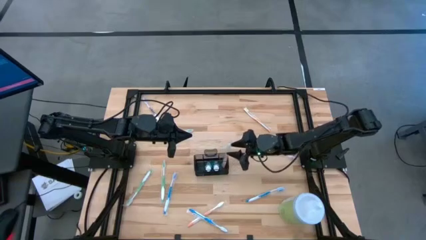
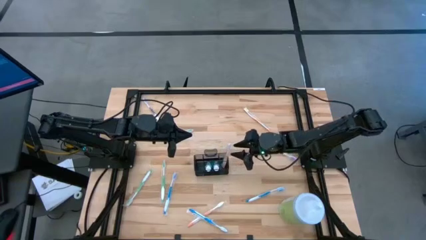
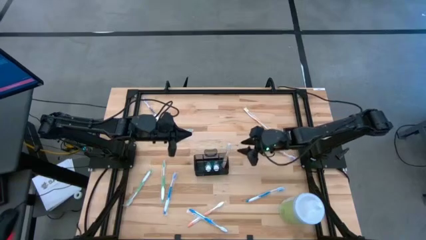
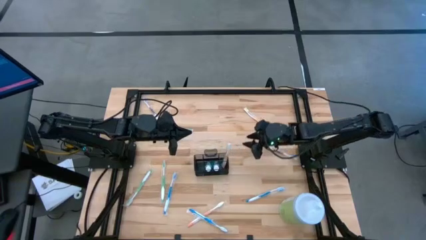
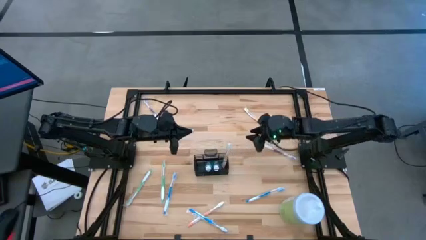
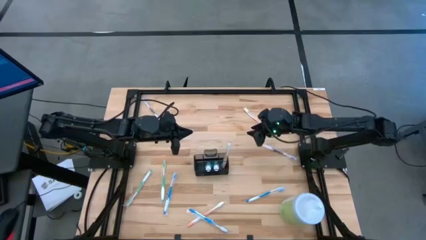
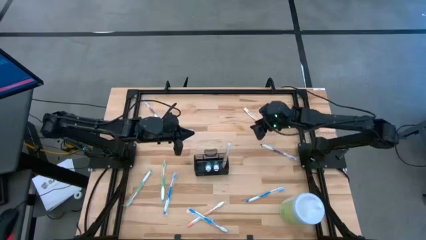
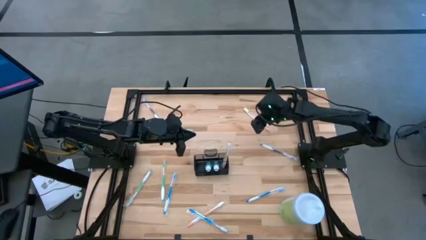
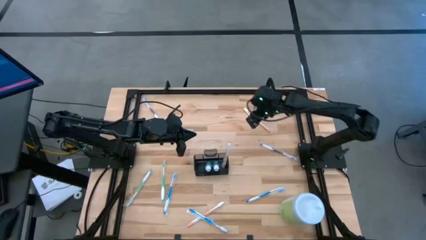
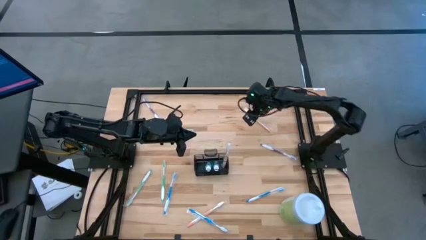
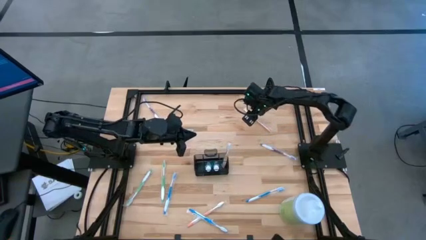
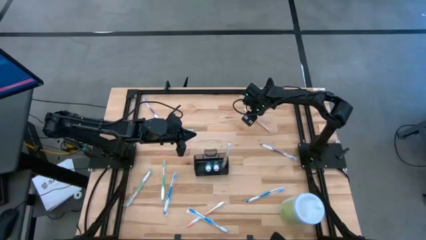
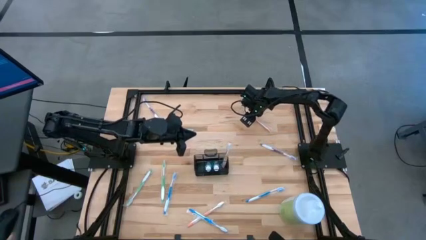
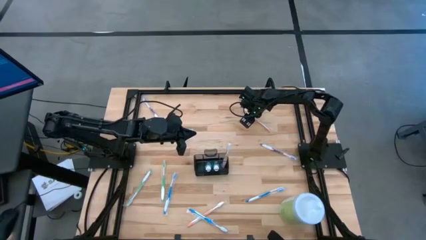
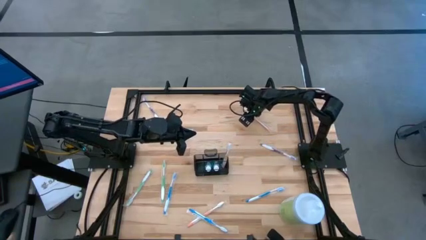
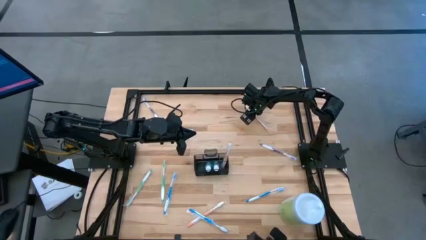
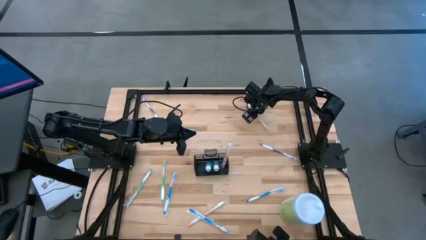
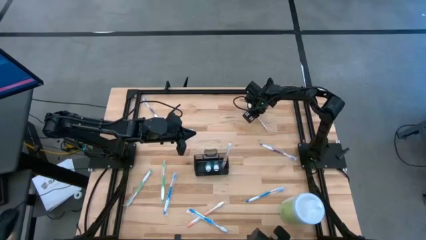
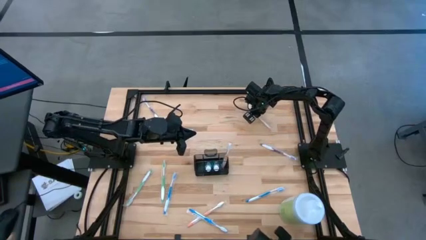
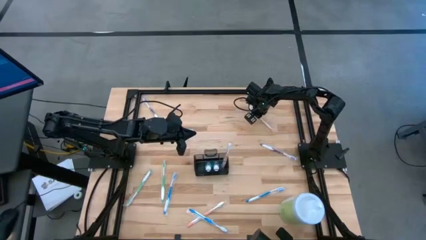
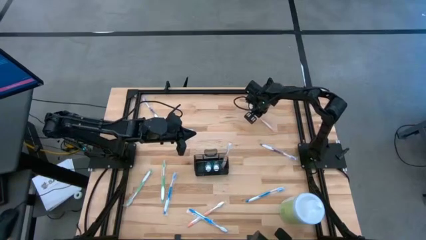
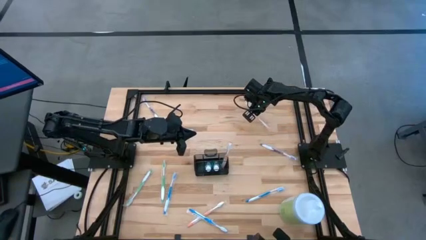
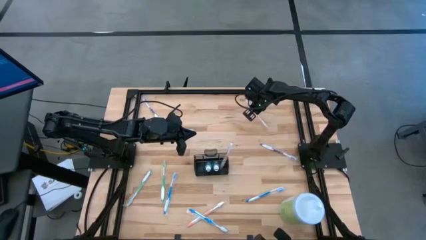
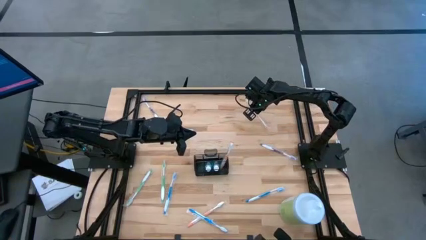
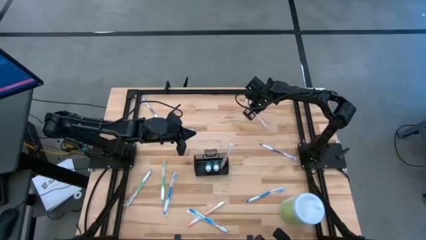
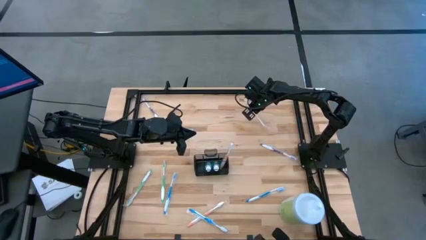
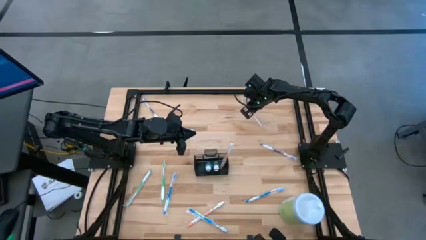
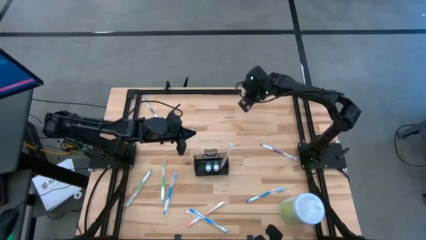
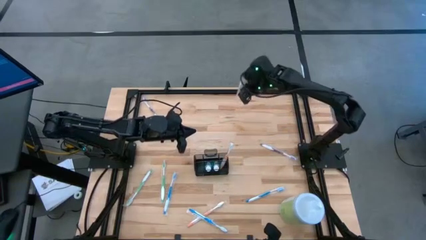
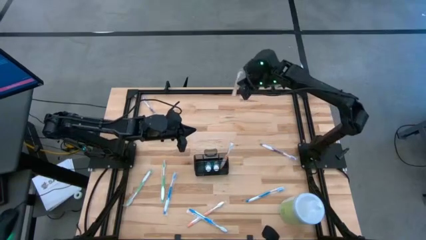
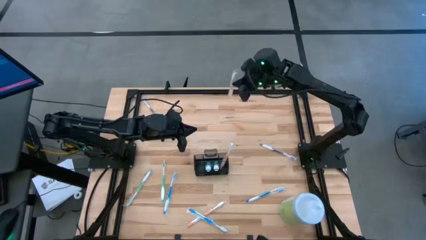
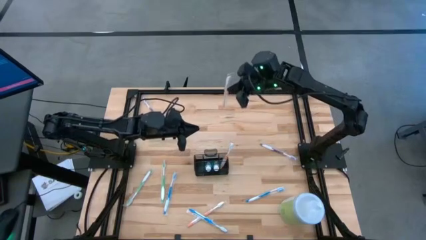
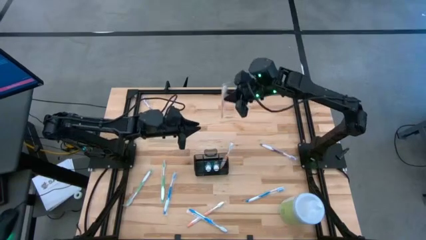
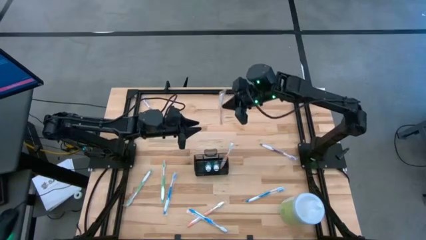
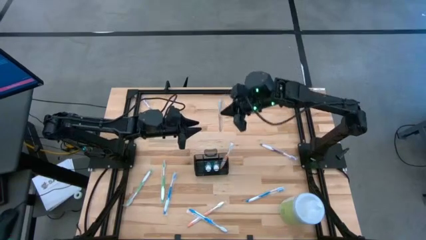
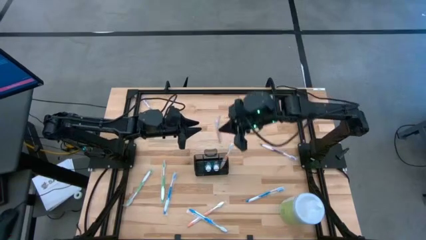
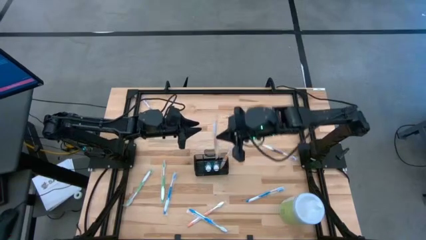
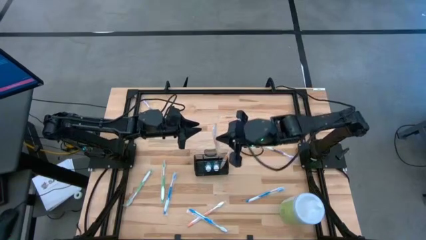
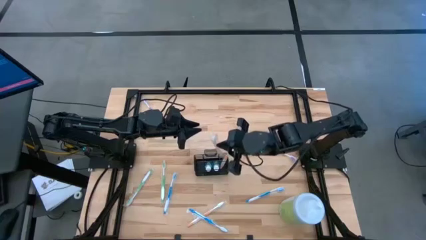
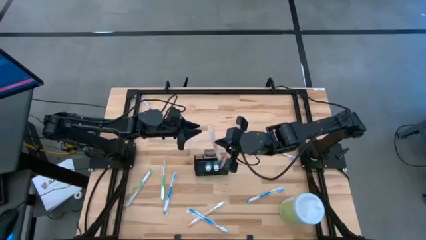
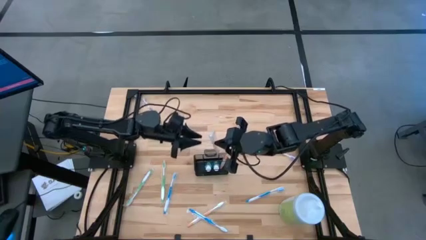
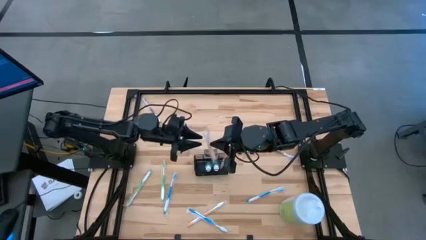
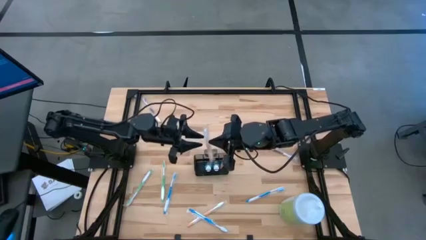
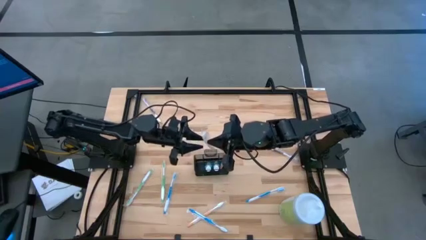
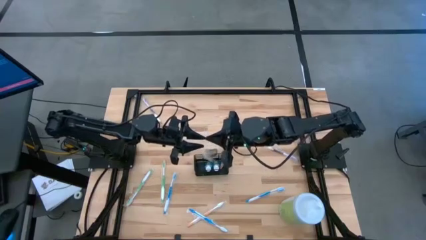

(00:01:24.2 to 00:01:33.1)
Task: Pick & Place toothbrushing station
Put the top right orange toothbrush into the top right section of the mesh organizer

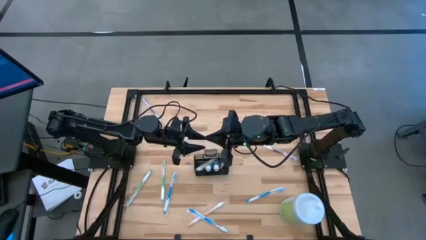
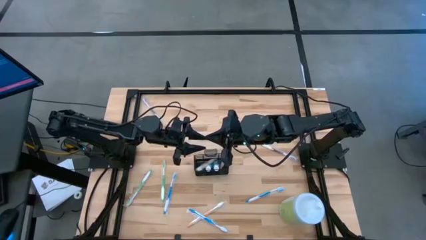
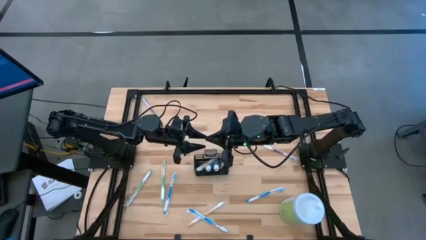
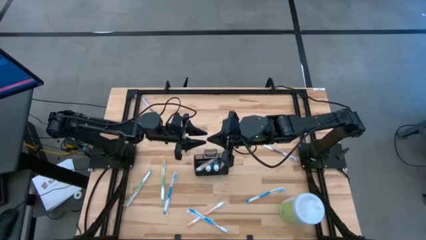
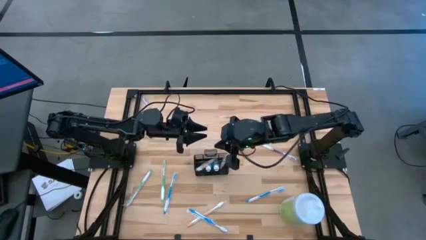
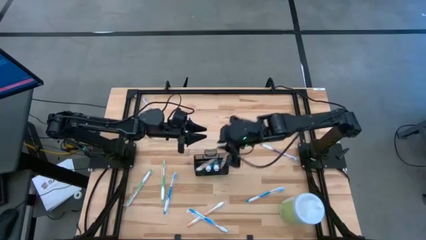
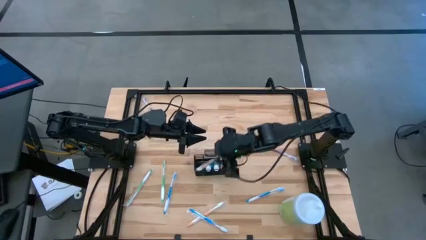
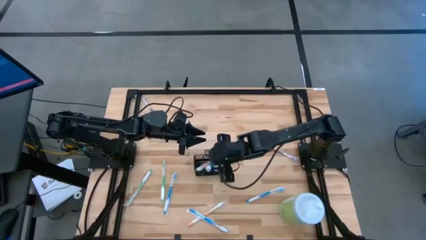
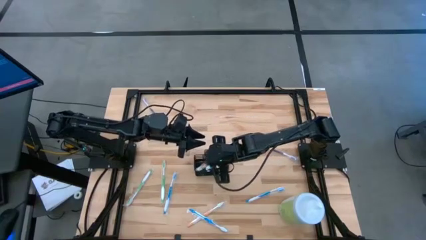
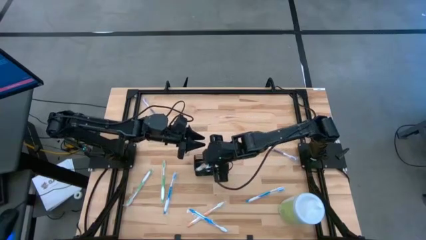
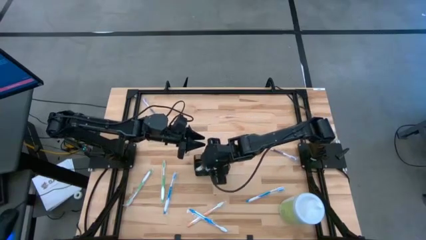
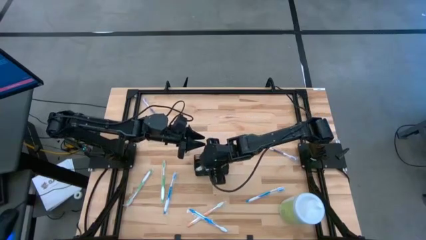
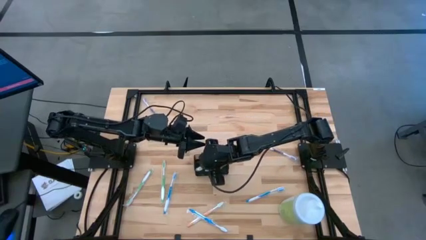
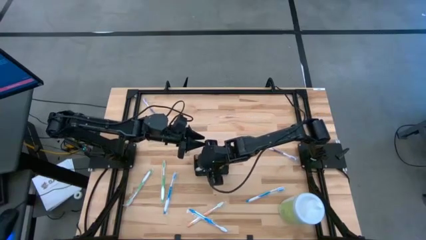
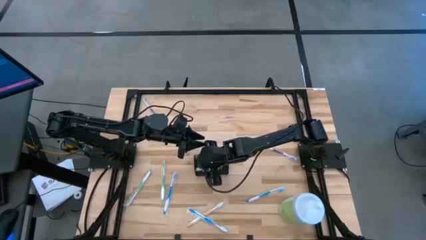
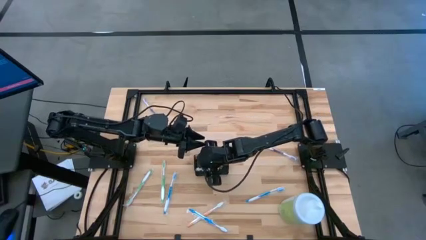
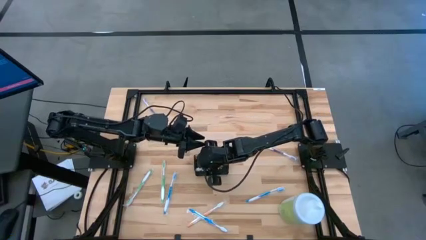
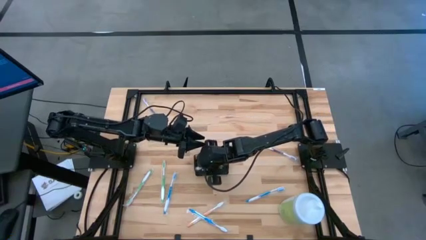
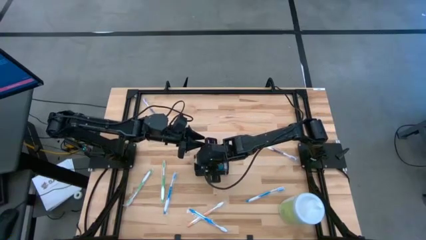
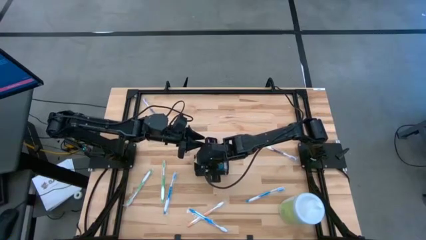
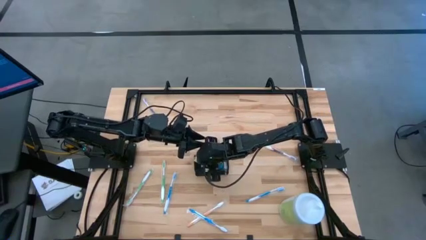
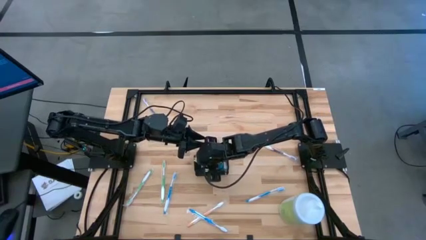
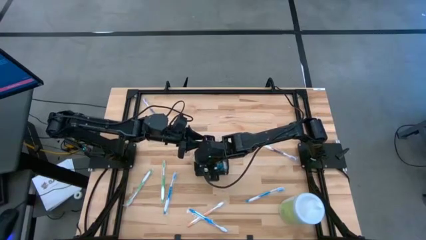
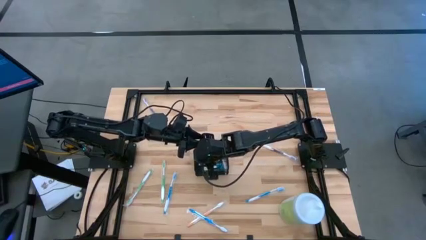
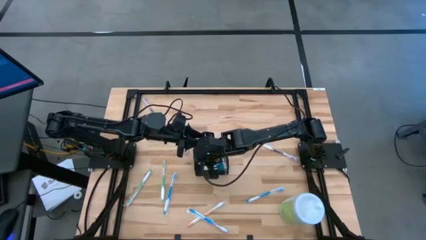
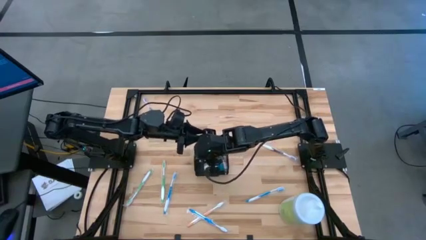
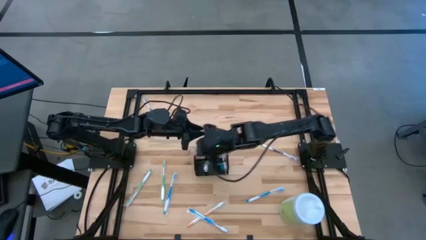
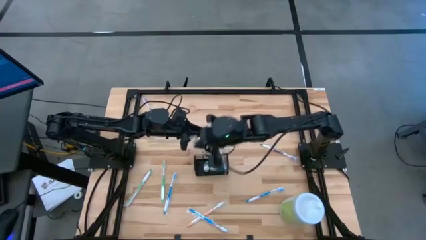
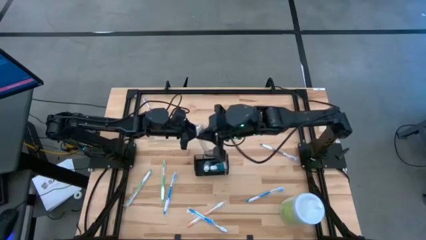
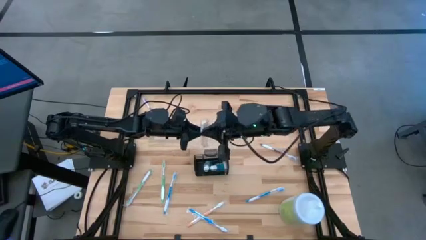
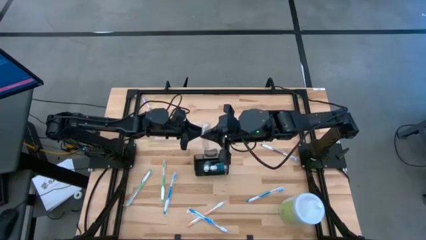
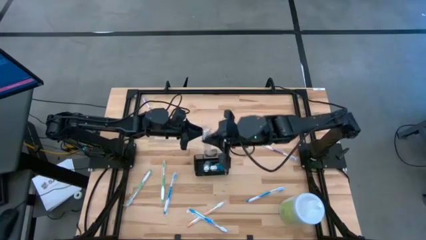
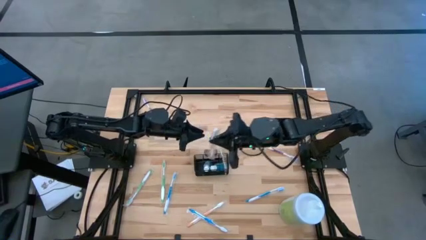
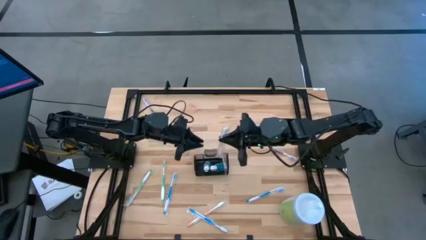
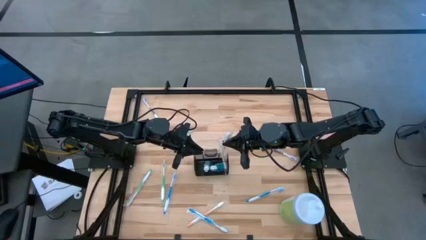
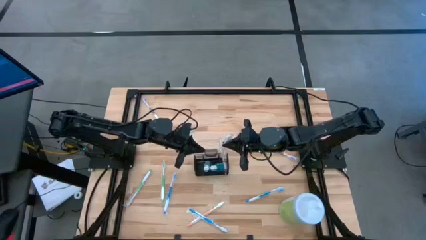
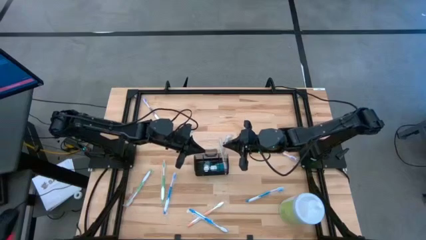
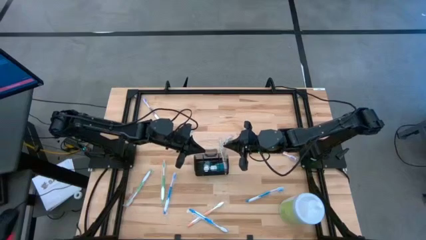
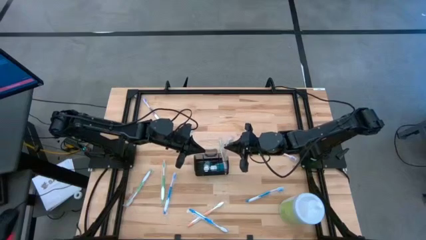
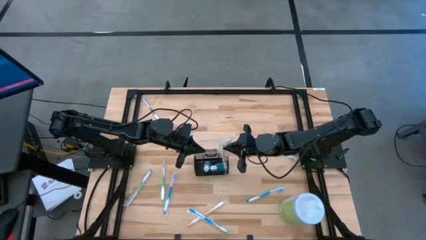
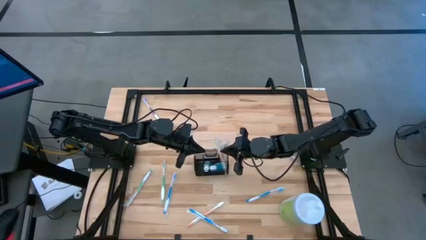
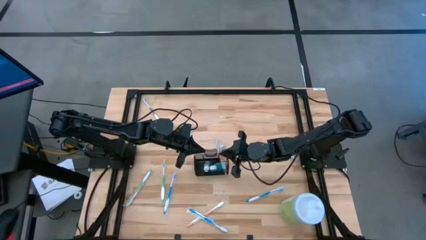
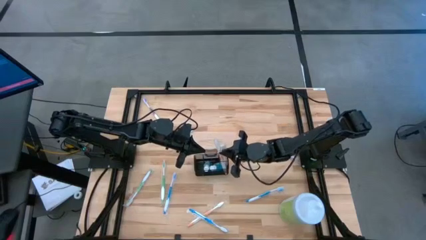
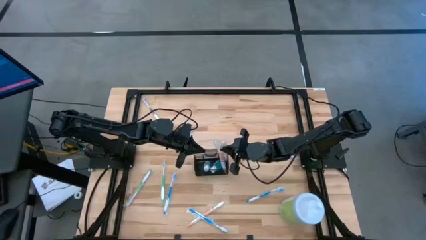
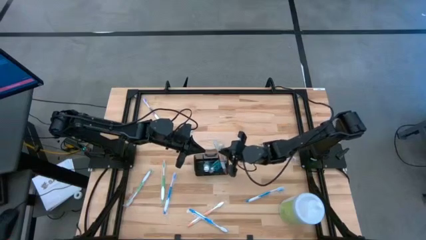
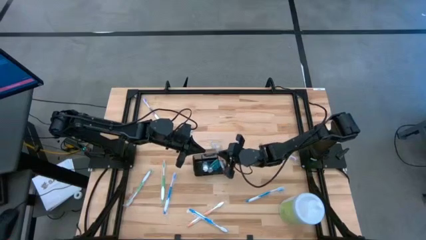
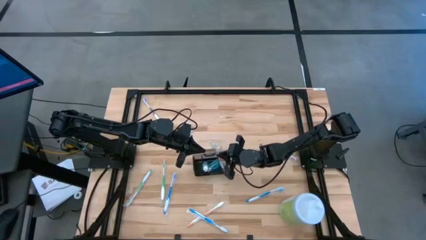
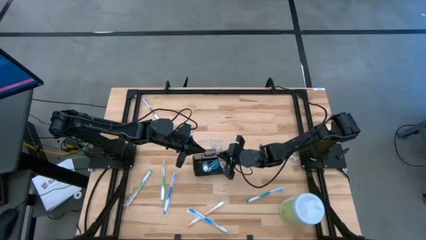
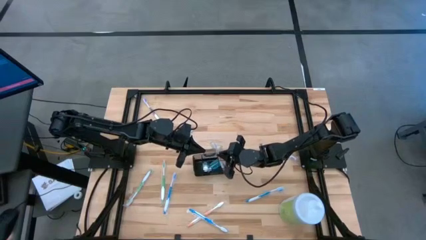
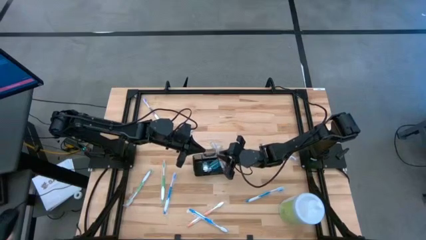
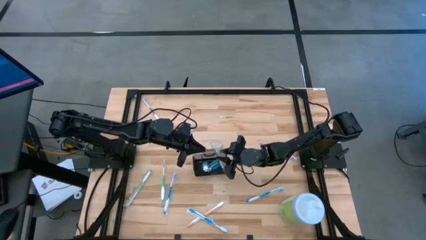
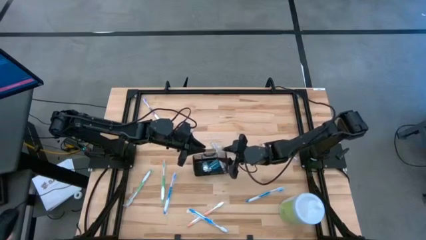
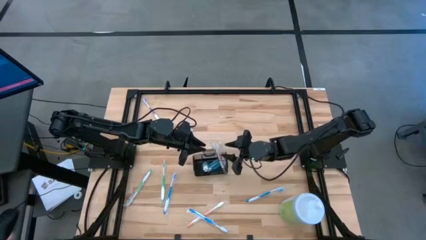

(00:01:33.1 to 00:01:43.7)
Put the top right orange toothbrush into the top right section of the mesh organizer
